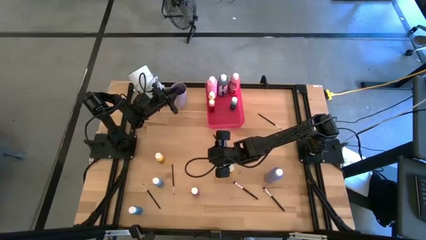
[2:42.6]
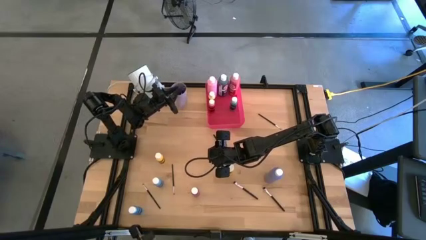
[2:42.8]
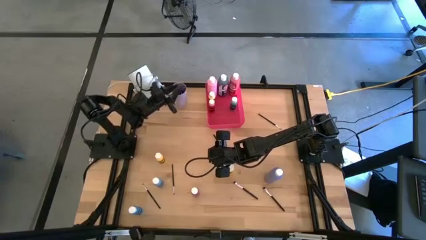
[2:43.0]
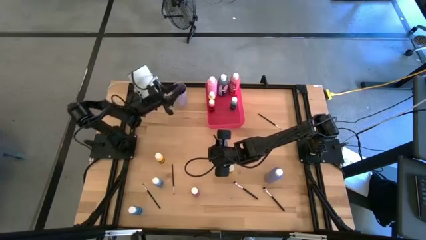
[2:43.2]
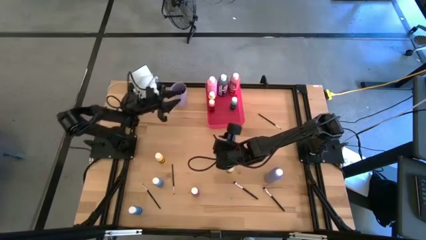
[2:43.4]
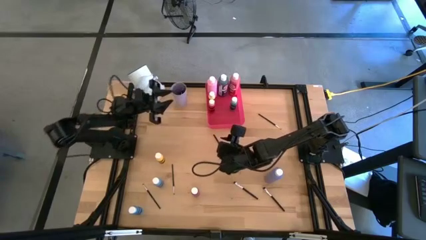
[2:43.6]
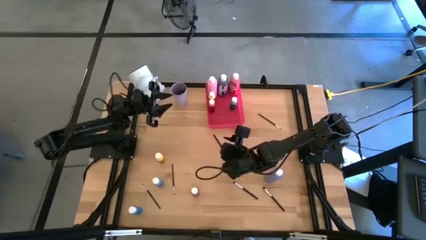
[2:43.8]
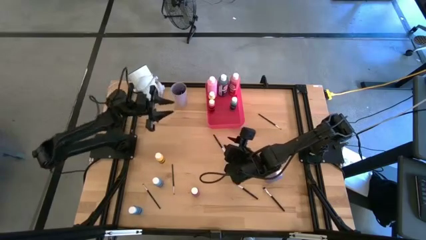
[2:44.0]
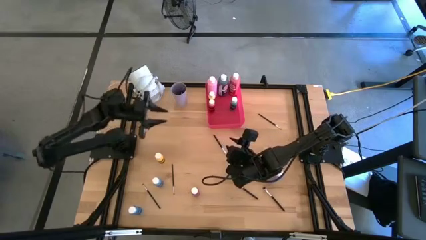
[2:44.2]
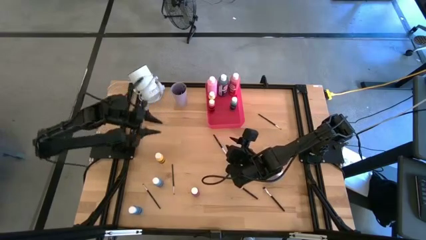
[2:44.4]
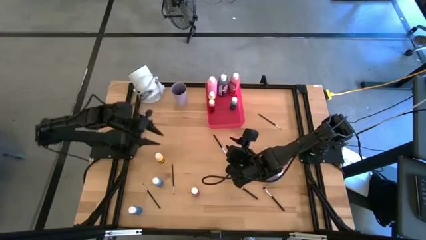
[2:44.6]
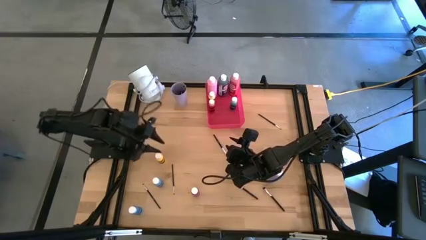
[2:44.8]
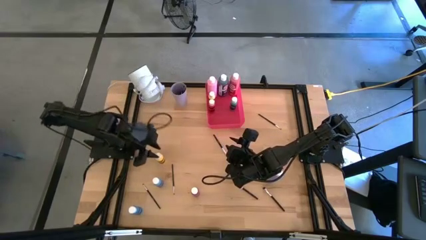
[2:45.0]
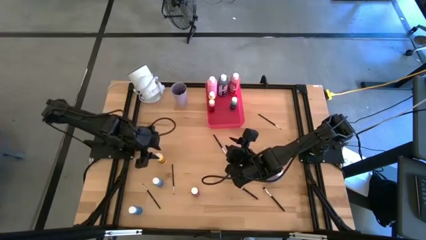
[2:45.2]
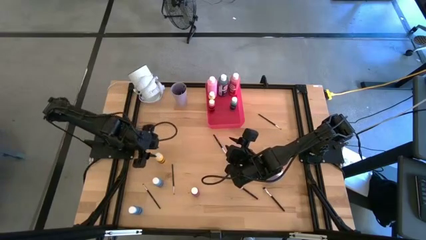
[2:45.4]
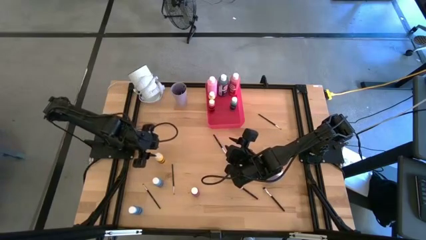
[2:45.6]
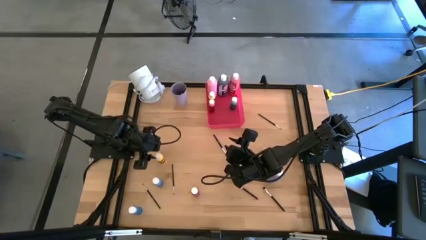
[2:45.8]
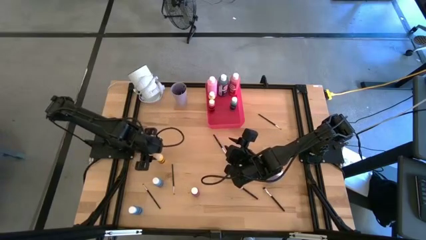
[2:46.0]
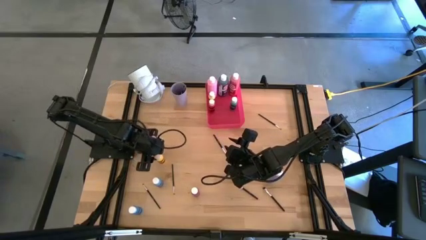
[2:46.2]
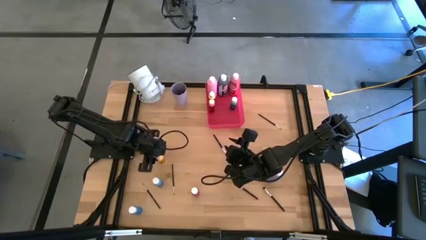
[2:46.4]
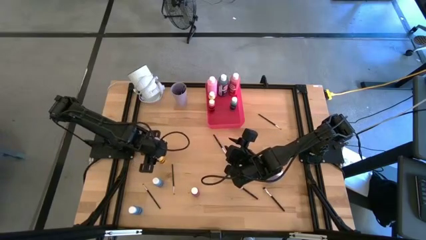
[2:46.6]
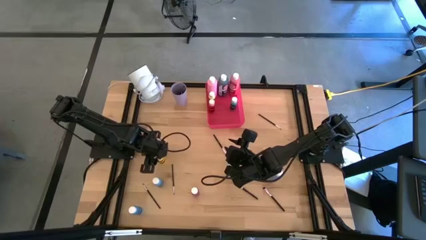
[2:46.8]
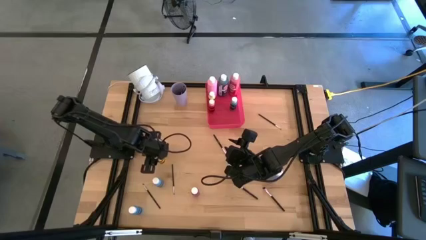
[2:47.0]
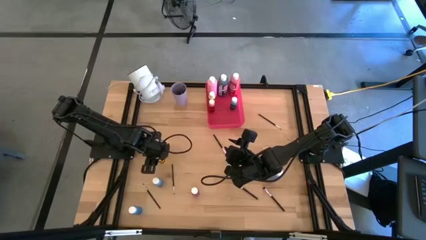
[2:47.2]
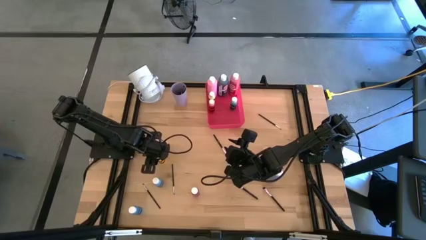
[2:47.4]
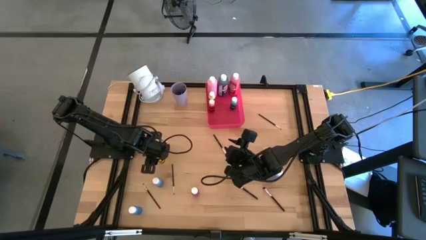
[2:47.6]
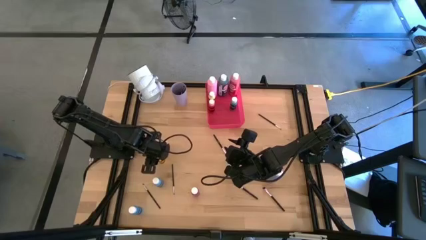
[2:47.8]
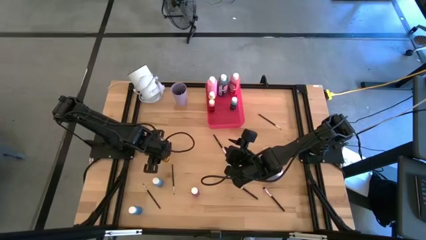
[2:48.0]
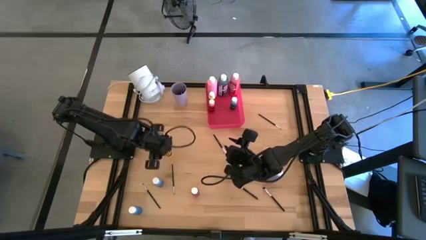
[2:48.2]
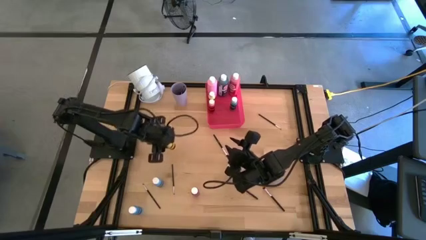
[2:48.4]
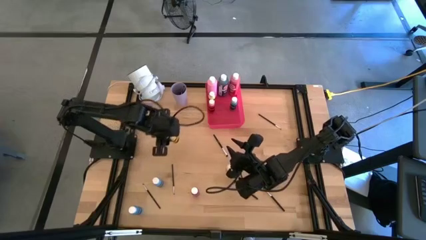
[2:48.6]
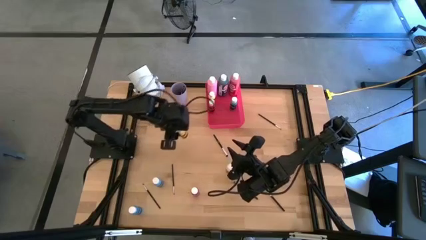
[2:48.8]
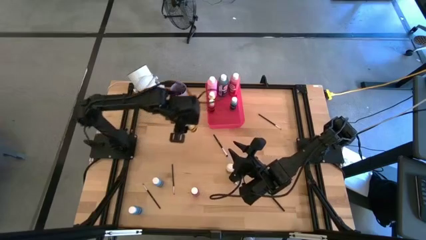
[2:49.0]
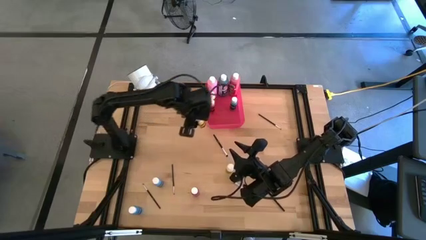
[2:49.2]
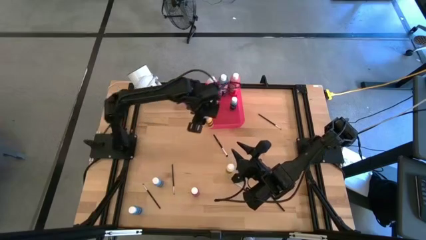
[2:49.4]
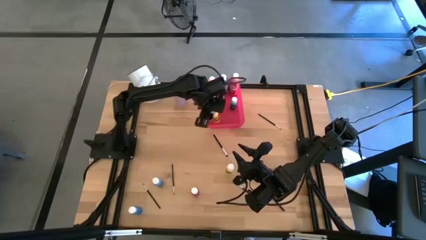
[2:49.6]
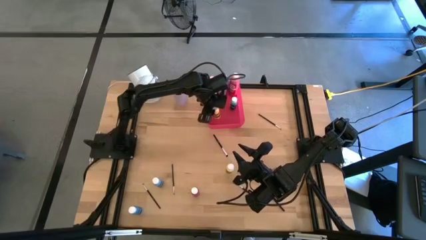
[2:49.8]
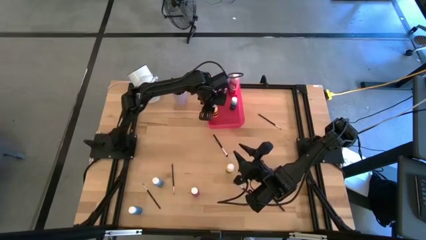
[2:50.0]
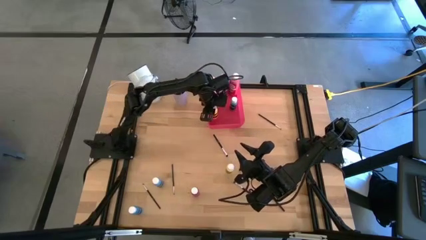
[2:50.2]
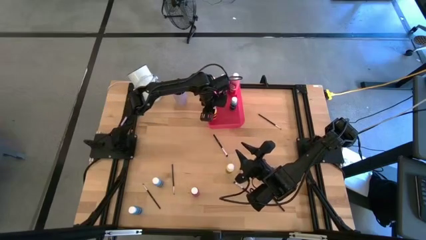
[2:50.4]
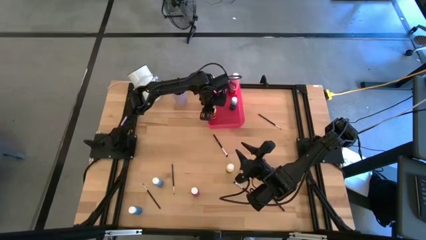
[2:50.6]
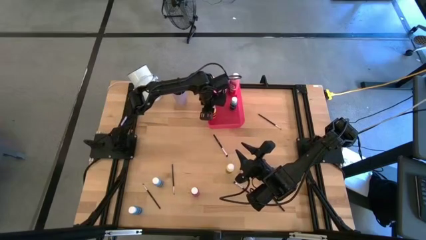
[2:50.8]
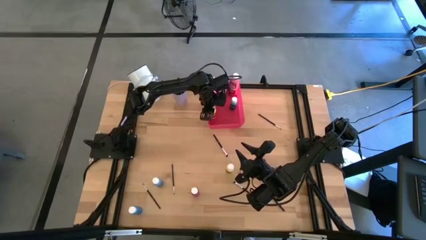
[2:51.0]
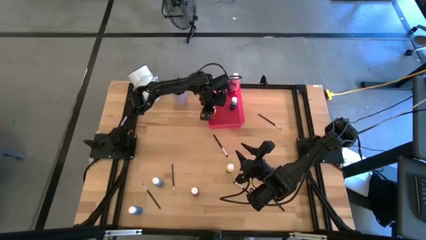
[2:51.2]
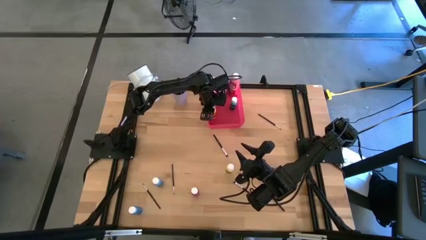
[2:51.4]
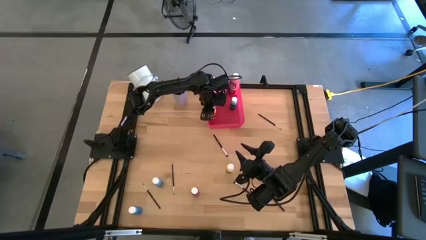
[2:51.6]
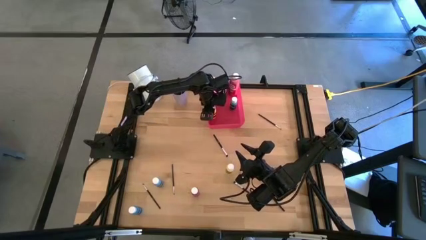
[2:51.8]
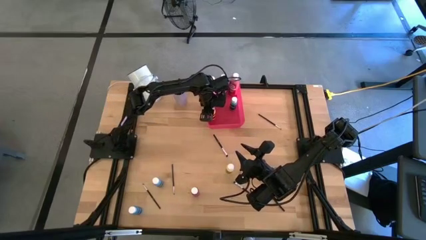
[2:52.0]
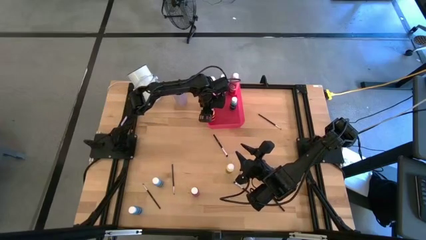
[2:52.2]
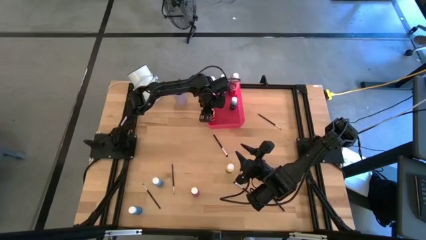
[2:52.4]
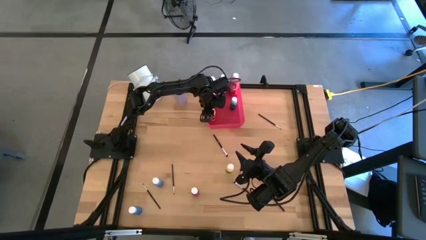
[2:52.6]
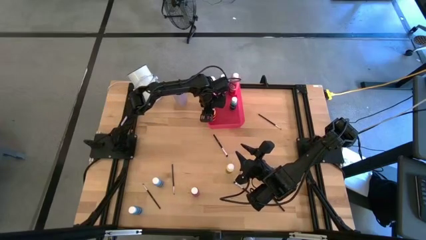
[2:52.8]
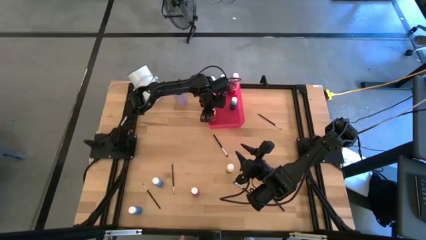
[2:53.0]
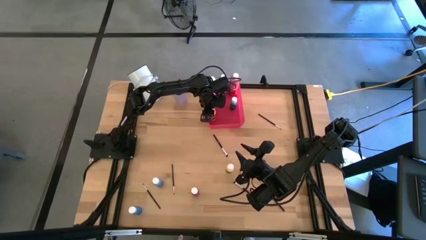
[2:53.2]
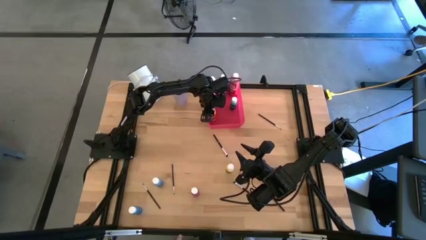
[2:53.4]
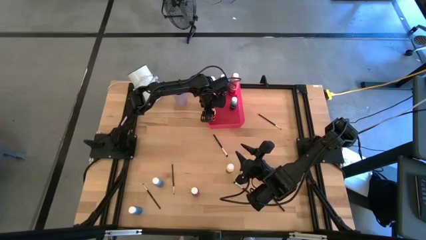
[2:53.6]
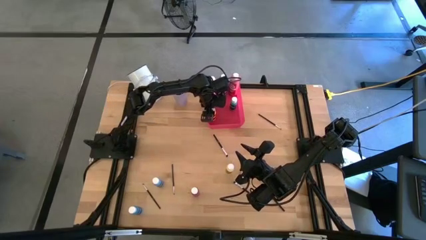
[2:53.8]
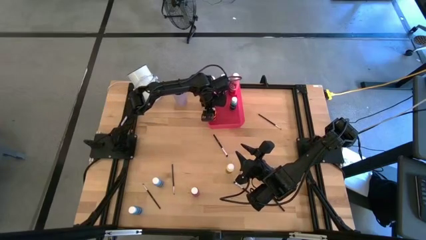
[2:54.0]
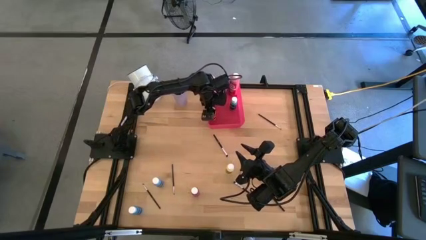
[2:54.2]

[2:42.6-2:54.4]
Task: Pick & Place Paint Supplies
Put the left yellow paint bottle into the red bin

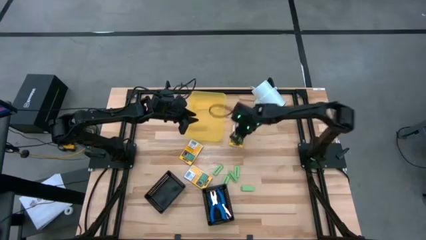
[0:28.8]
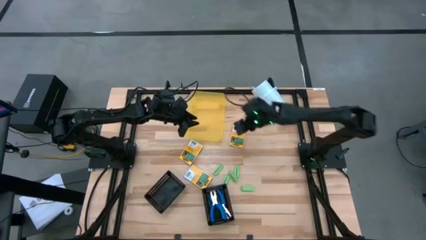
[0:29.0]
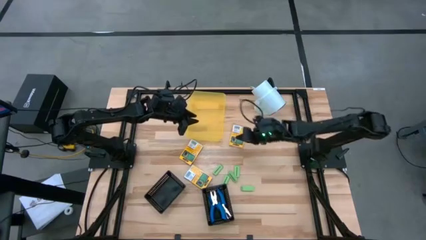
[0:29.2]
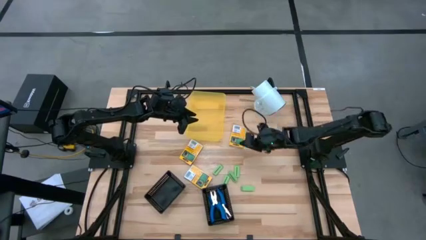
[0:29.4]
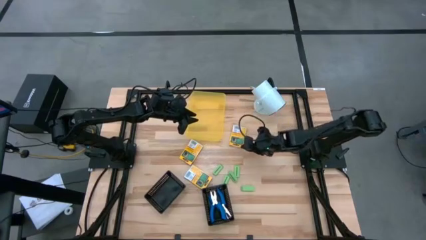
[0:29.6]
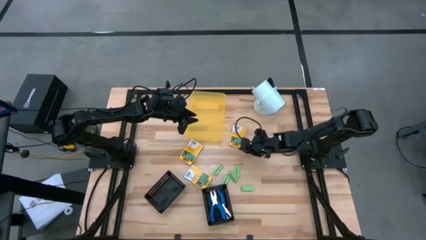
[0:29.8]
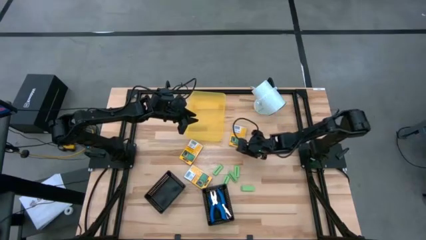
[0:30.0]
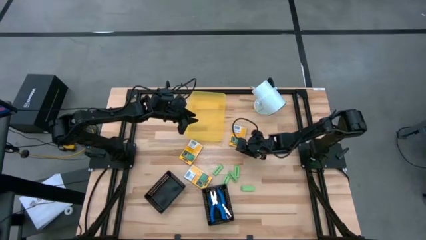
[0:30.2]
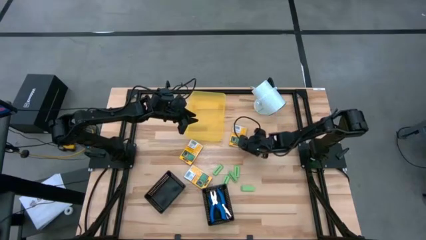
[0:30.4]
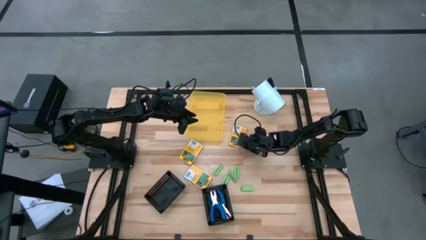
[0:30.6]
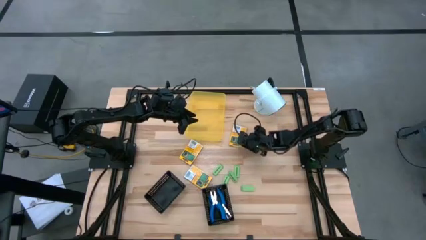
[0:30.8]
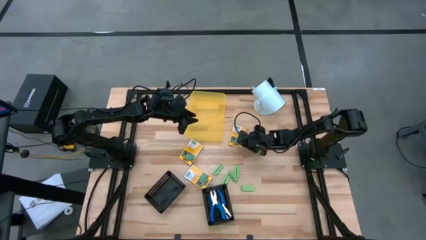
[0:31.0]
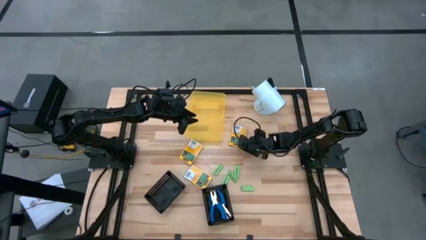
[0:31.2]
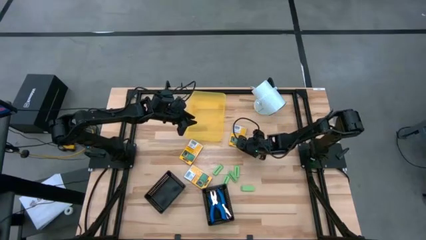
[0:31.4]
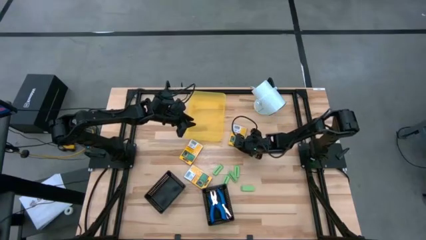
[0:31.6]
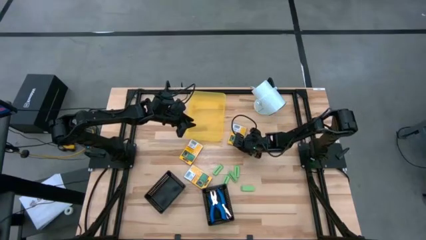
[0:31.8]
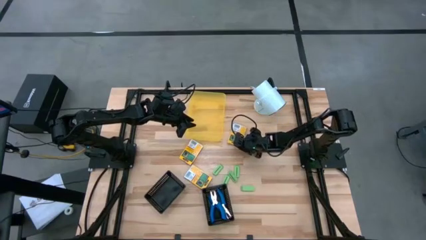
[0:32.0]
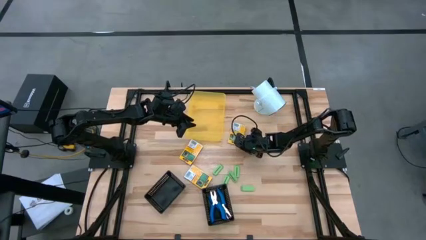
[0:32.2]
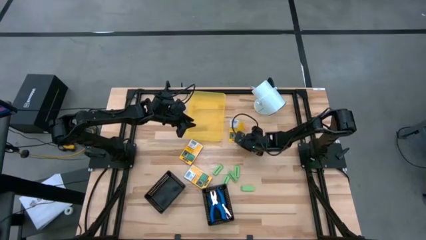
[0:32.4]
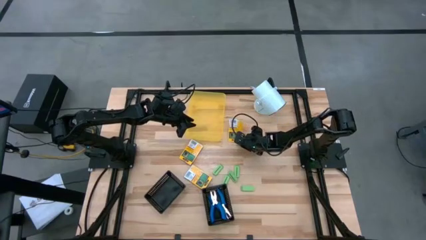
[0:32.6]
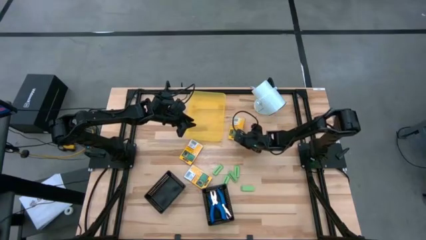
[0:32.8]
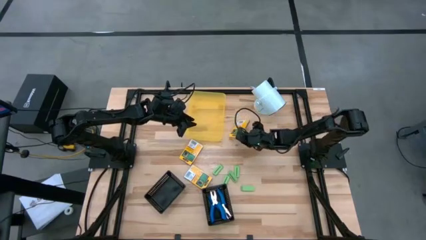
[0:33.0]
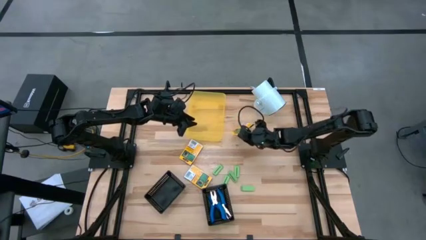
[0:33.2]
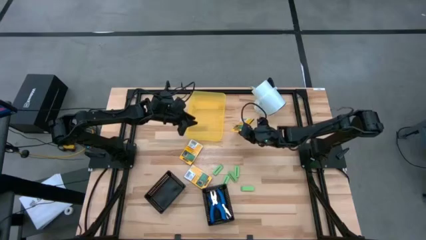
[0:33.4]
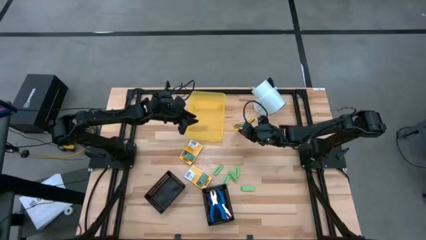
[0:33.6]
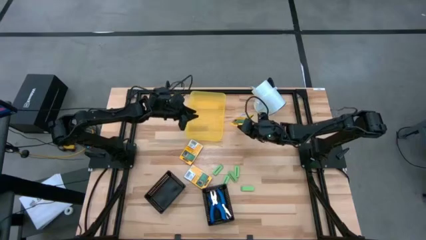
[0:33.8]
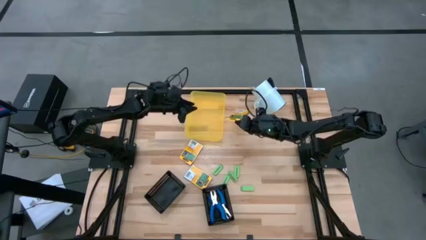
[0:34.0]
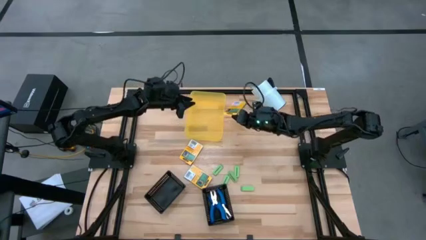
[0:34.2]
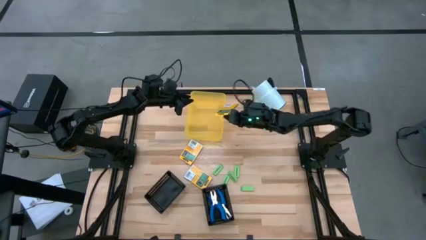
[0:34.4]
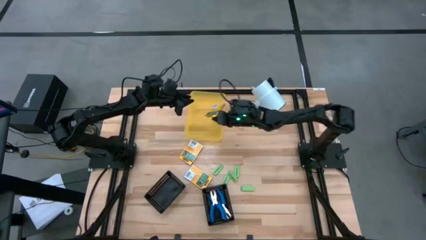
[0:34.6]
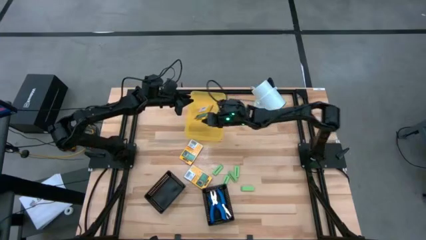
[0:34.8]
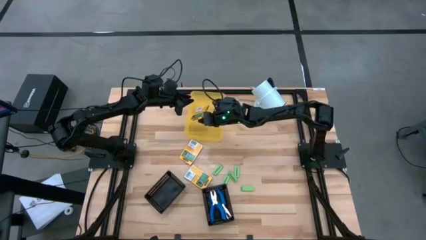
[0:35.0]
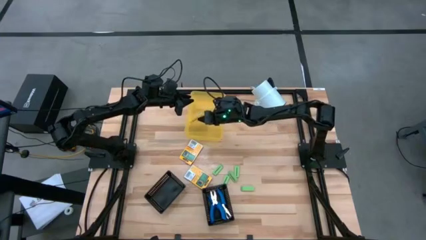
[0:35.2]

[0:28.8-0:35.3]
Task: Pick & Place School Supplies
Put the box of crayon into the yellow bin
